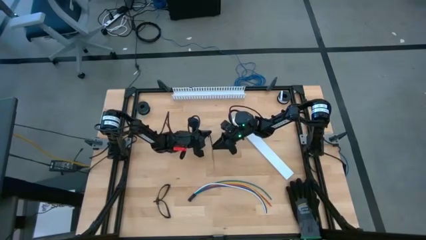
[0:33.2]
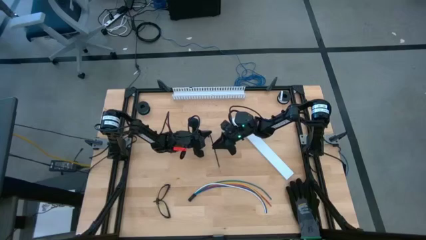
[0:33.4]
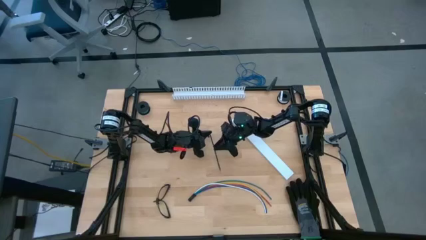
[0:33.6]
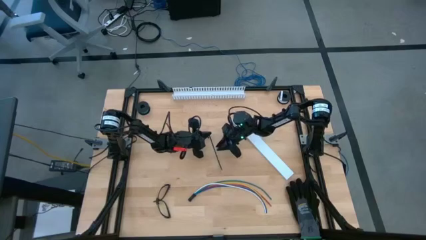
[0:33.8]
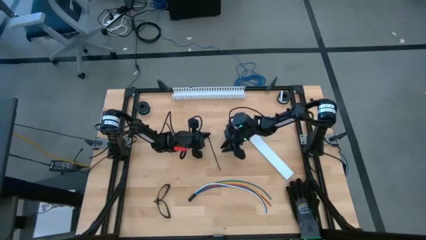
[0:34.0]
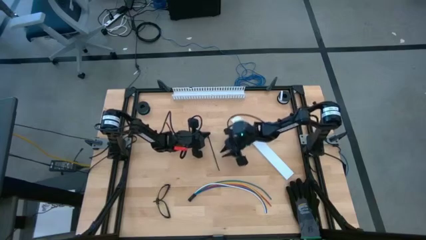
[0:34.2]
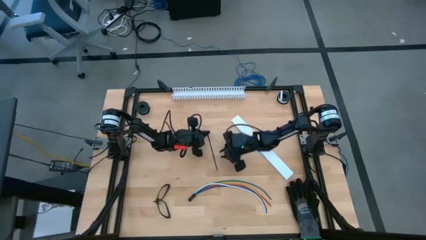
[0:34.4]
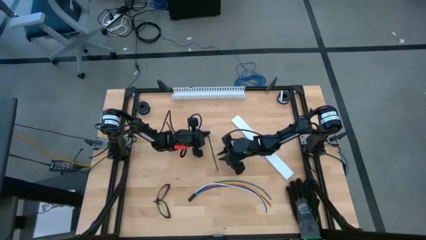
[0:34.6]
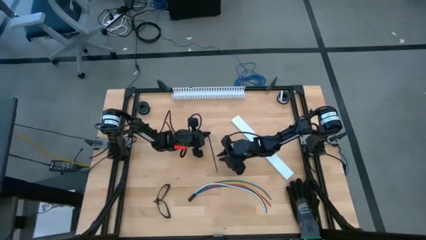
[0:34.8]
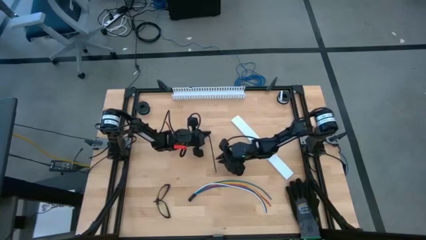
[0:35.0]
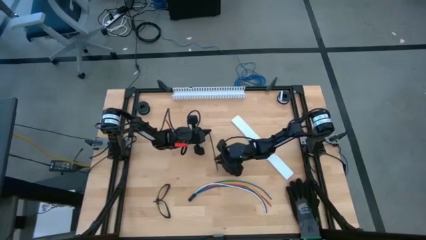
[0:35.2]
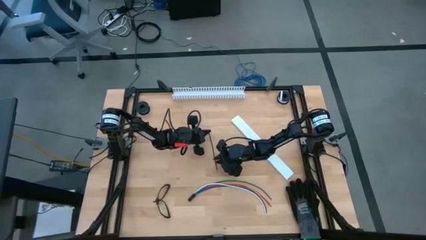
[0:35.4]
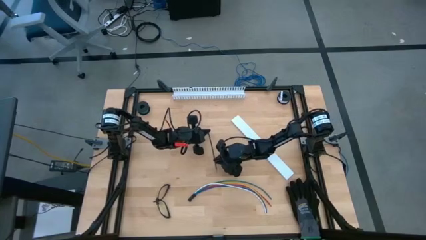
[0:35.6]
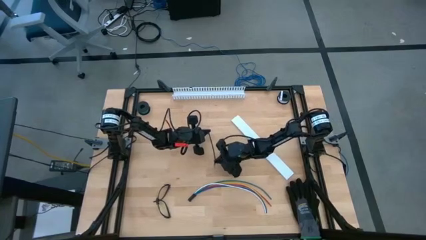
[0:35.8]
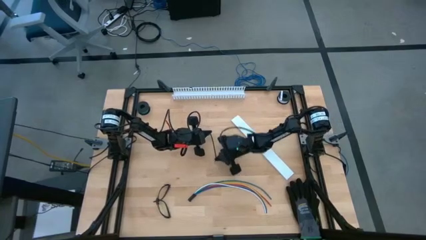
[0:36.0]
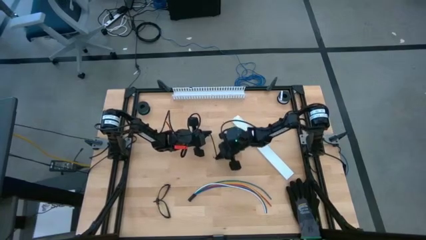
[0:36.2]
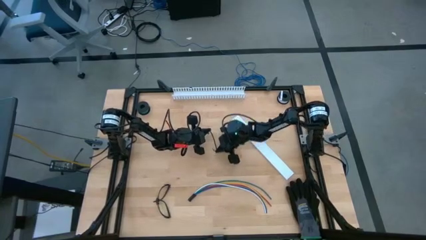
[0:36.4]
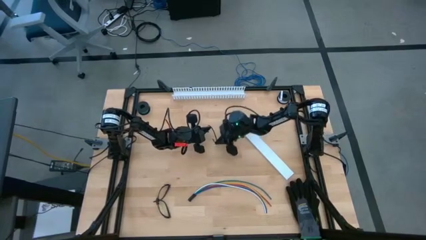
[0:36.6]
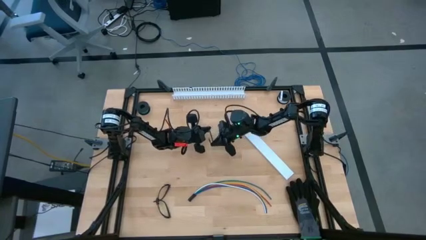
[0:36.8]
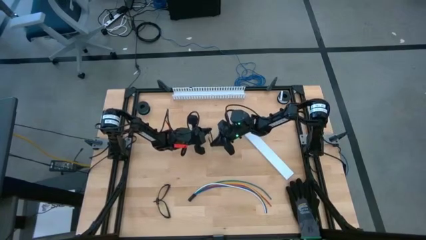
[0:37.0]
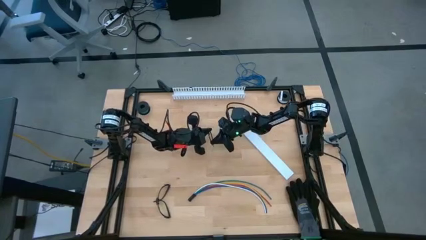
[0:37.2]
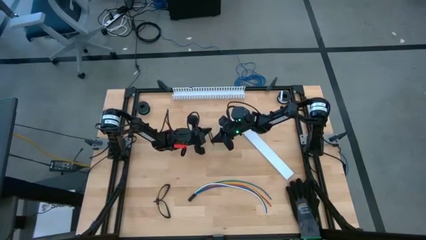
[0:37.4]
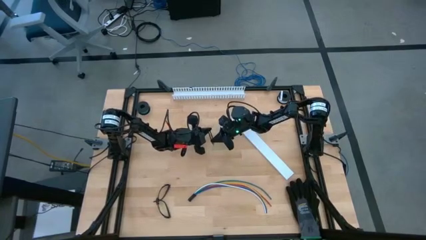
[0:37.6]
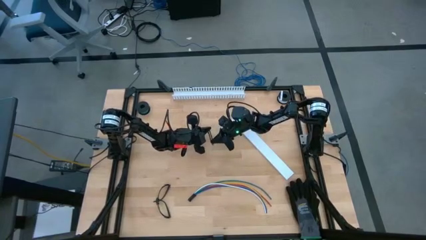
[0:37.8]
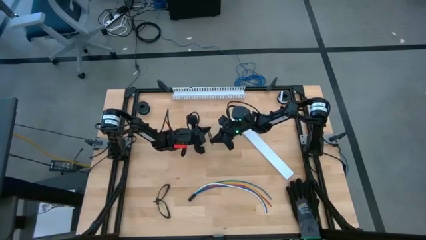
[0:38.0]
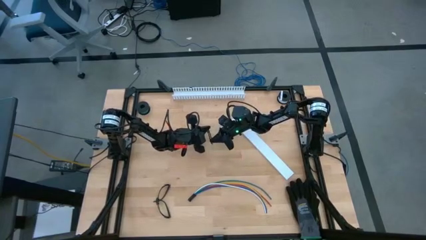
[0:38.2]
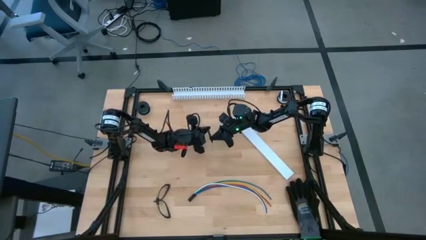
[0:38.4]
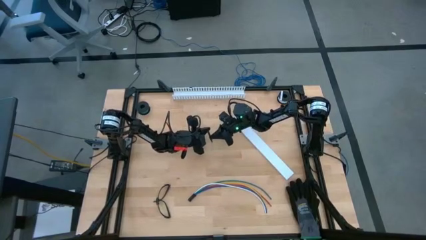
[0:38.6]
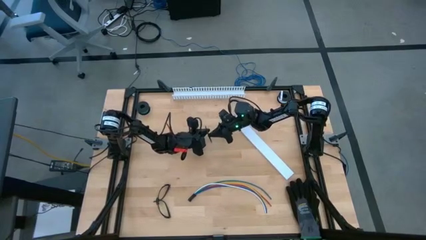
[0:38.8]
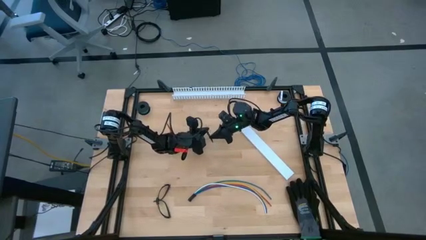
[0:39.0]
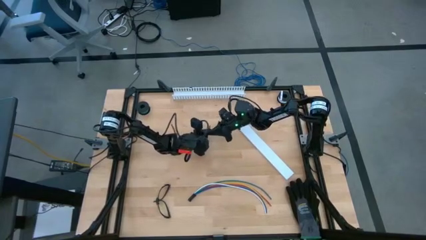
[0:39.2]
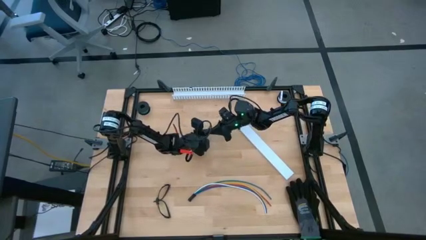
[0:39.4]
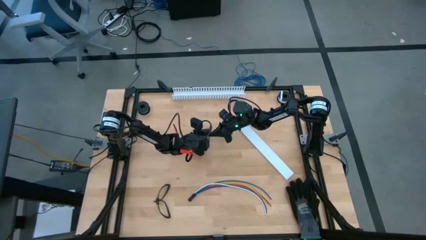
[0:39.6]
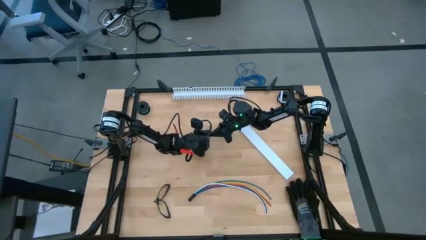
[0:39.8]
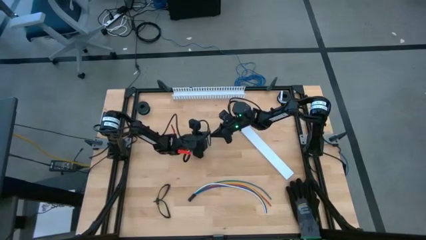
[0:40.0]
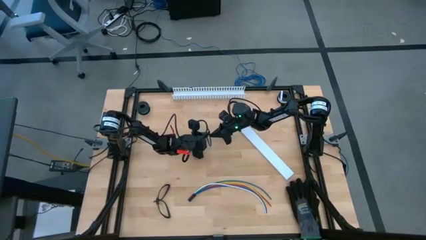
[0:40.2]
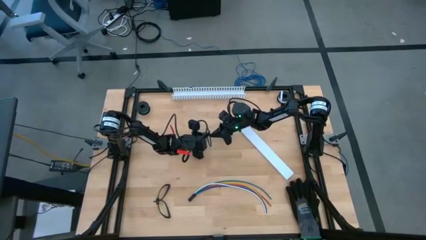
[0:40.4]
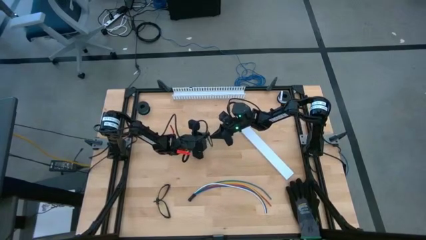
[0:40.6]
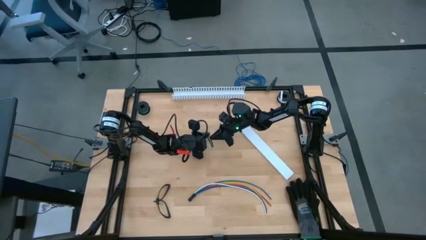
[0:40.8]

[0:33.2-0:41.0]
Task: Ziptie cables
Wrap the zip tie around the cable wires

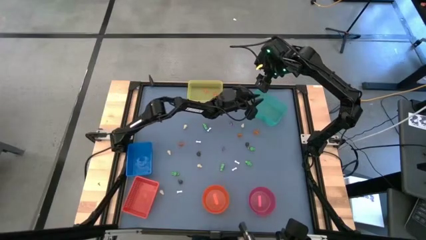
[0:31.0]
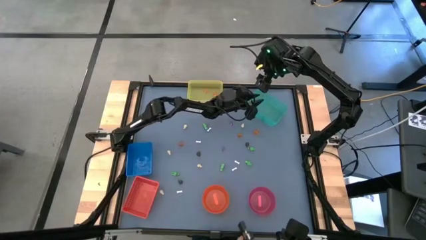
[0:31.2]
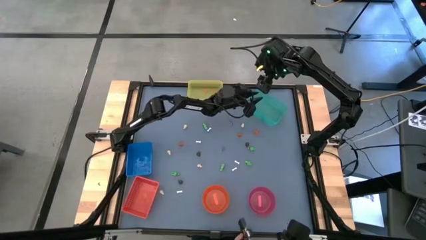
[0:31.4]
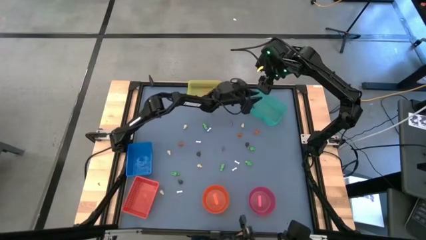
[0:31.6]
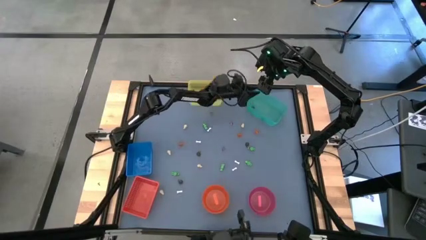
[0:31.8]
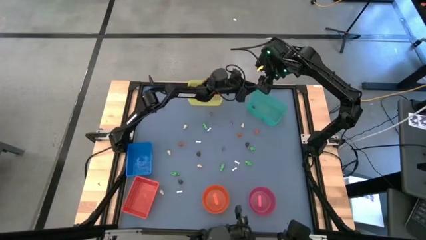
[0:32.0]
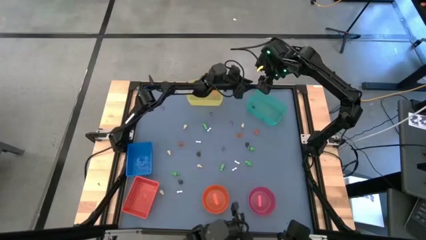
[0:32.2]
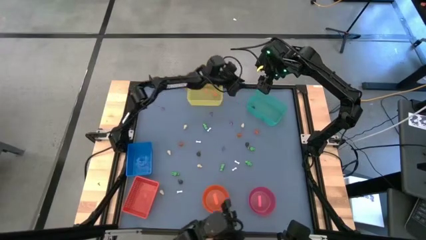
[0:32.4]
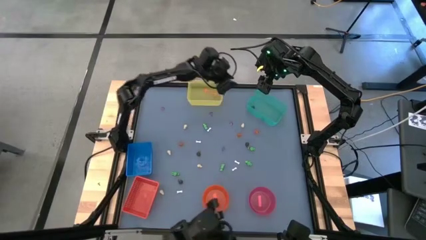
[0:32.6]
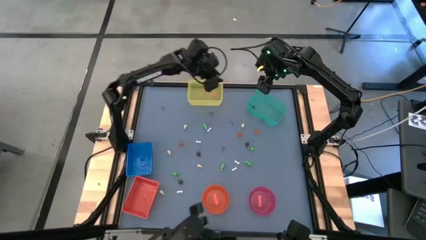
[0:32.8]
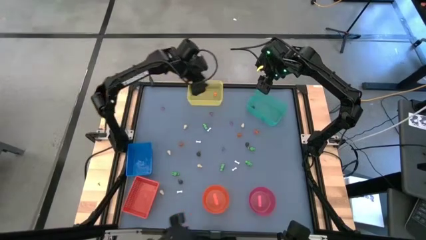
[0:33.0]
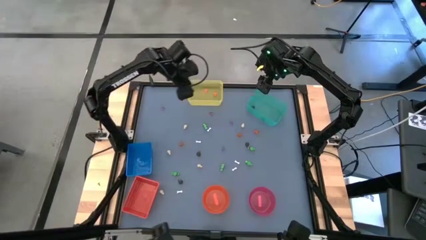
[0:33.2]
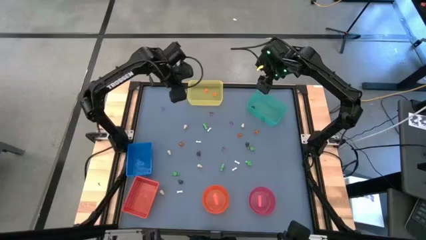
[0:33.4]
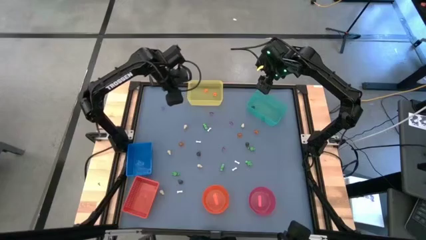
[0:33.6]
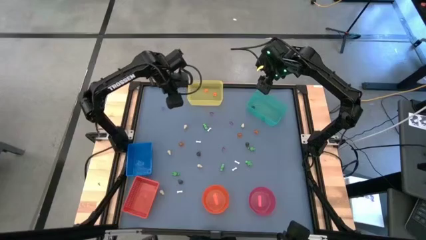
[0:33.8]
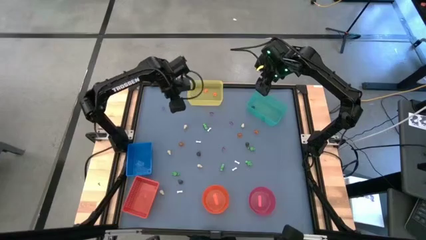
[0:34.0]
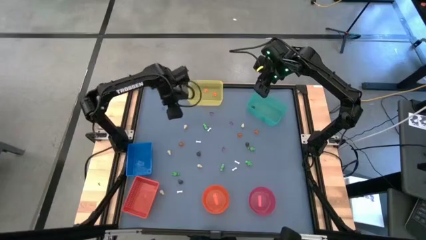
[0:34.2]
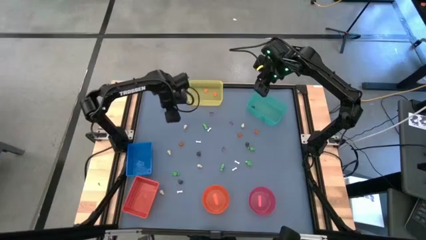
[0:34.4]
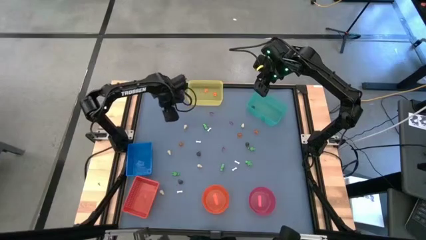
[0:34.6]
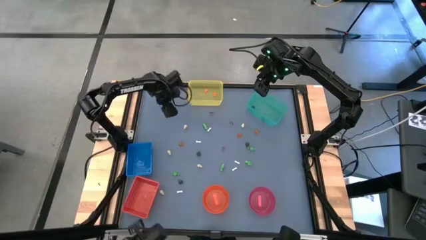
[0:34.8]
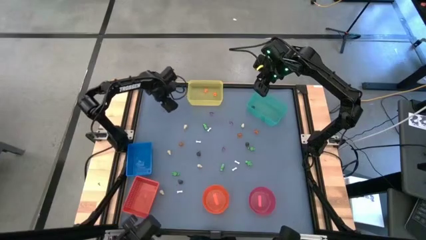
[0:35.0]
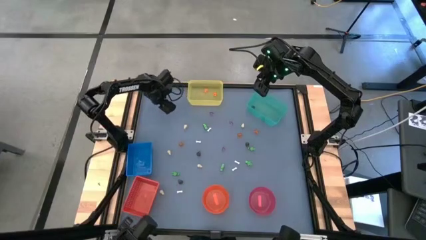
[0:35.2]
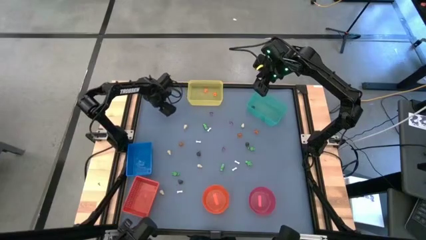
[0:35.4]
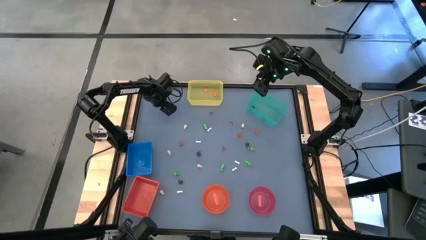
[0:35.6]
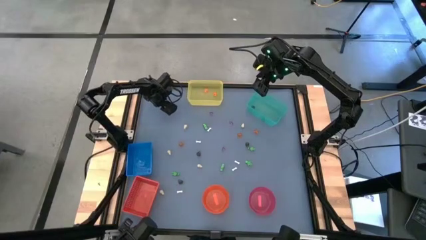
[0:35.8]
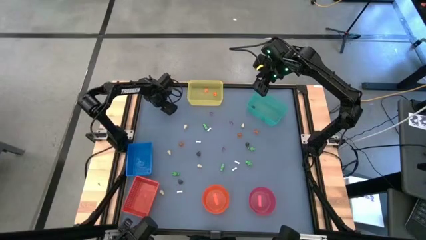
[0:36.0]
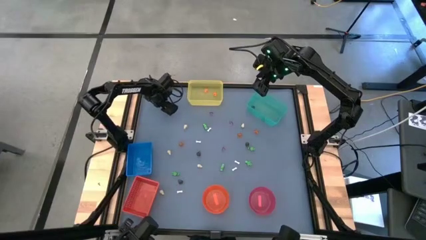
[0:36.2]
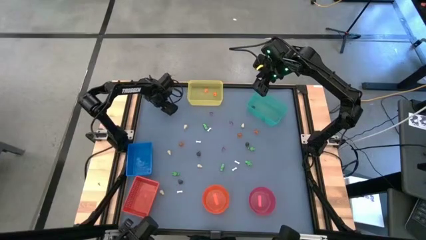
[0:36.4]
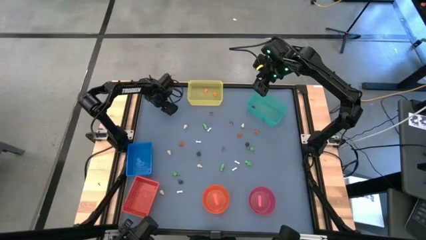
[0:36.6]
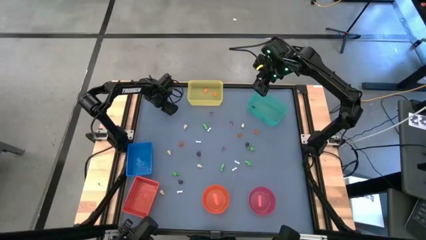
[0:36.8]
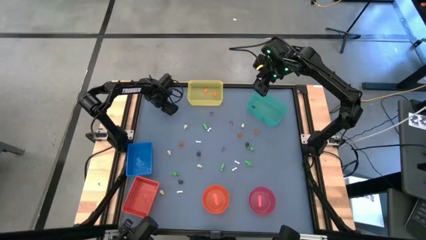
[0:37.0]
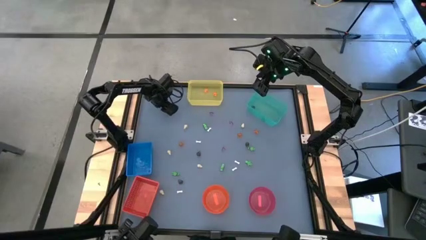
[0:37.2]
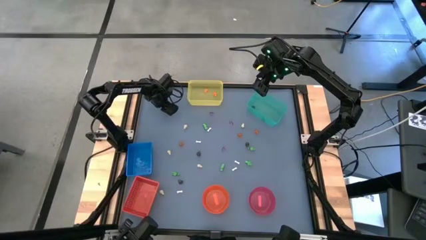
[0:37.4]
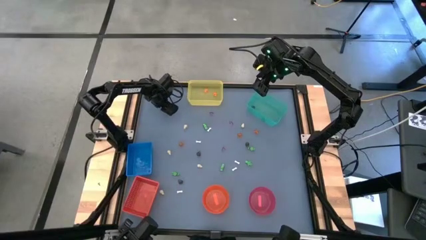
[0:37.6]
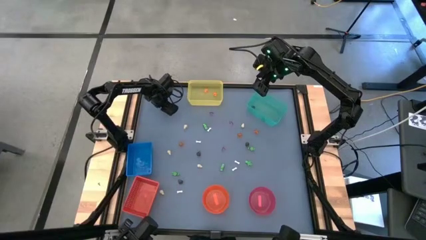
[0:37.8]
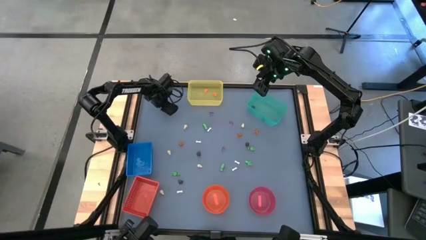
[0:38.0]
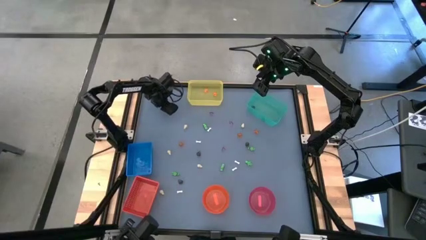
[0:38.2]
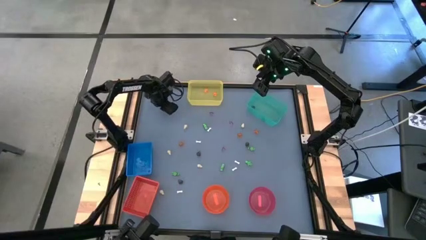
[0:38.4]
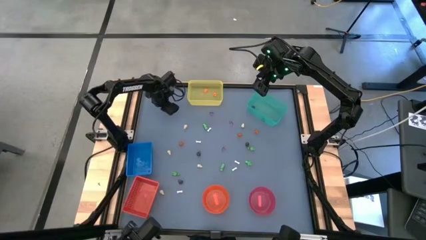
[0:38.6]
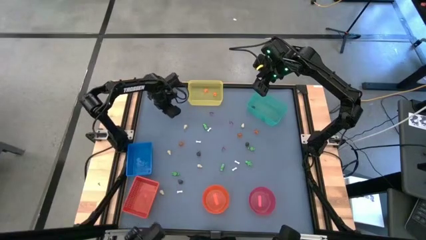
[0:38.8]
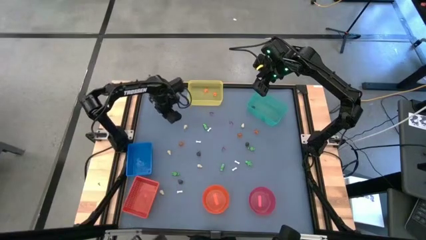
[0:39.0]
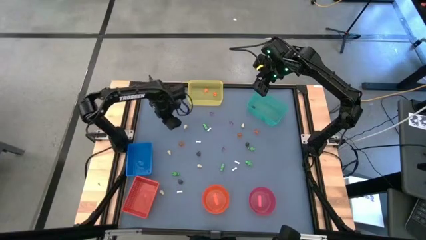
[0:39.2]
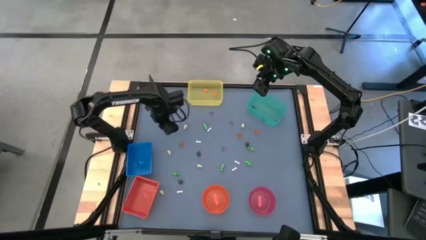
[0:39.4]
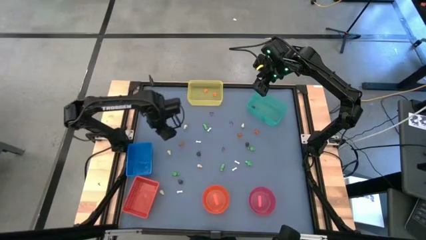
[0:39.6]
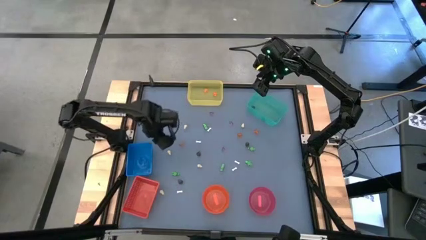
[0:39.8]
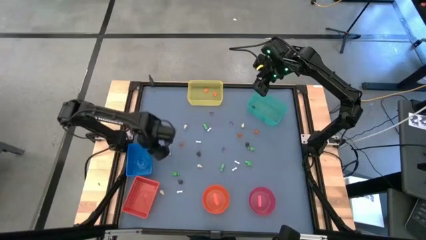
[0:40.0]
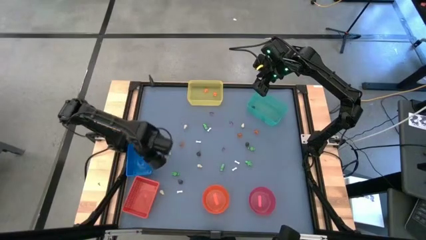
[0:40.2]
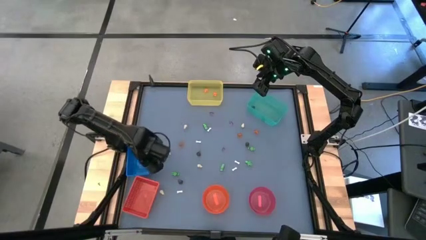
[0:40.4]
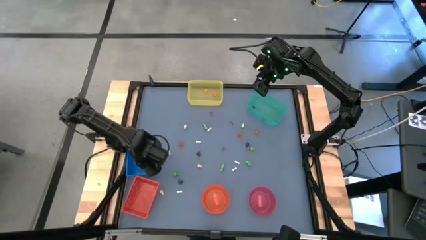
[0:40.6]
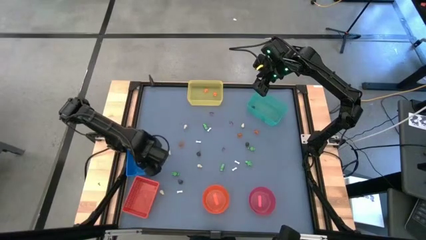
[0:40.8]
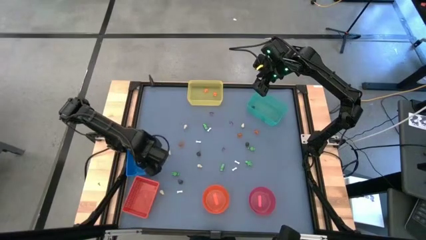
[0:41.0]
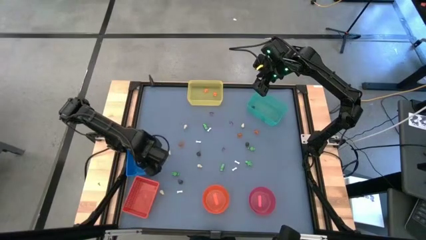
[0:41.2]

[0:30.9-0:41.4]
Task: Sort Halloween decoration
Put the purple witch hat toy into the blue bin
